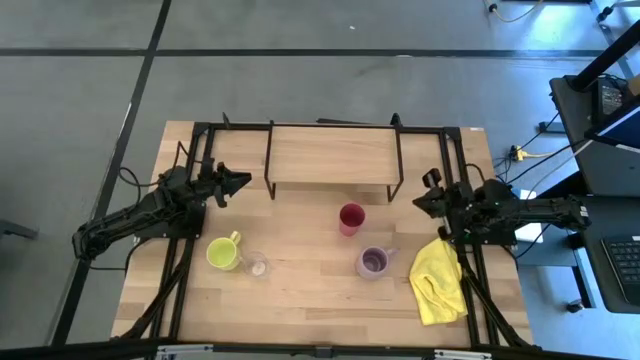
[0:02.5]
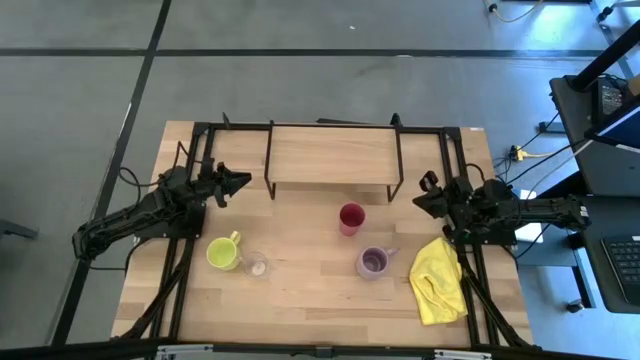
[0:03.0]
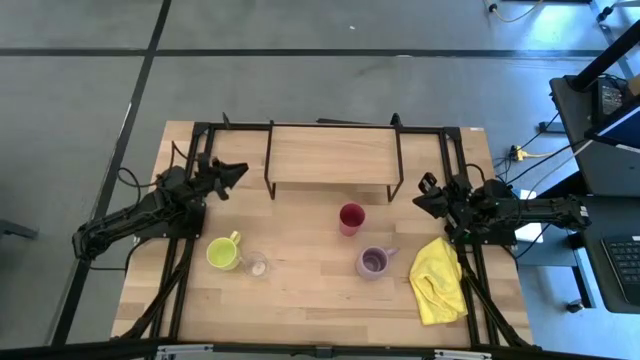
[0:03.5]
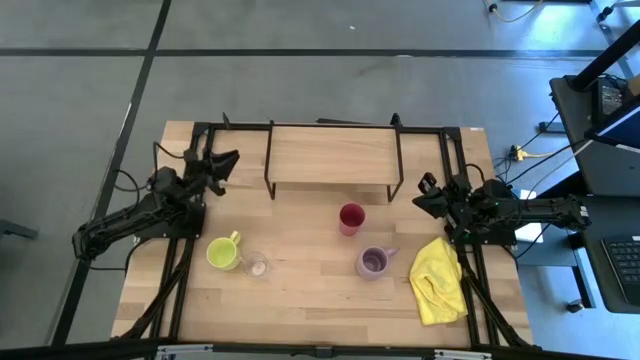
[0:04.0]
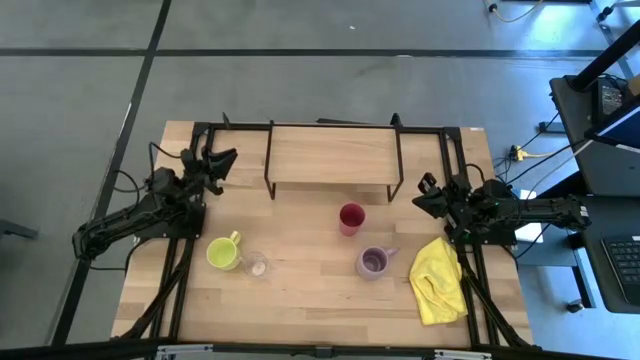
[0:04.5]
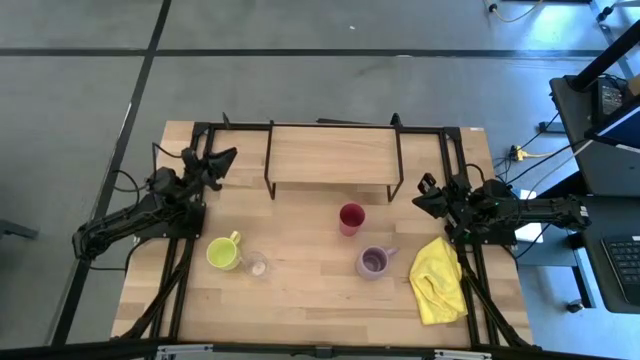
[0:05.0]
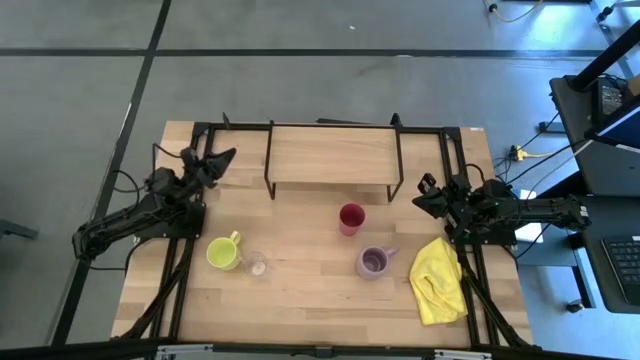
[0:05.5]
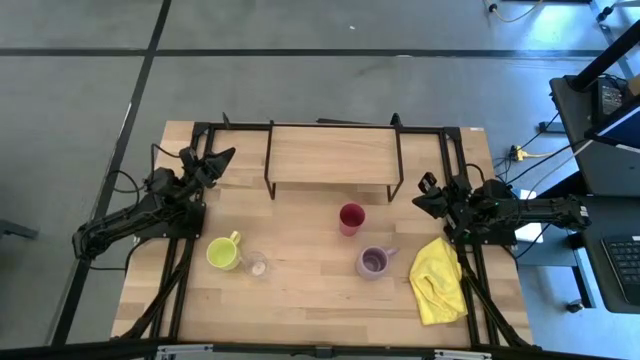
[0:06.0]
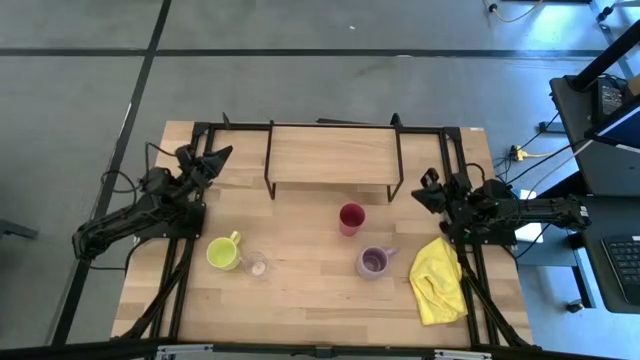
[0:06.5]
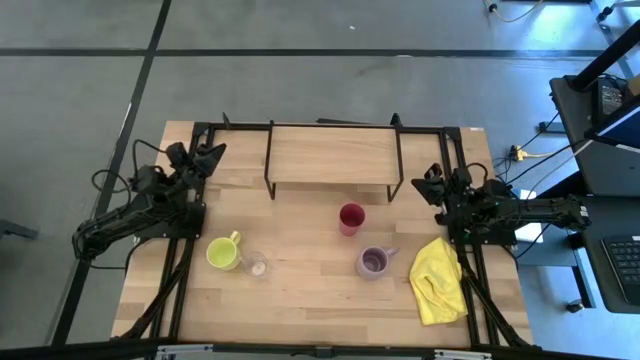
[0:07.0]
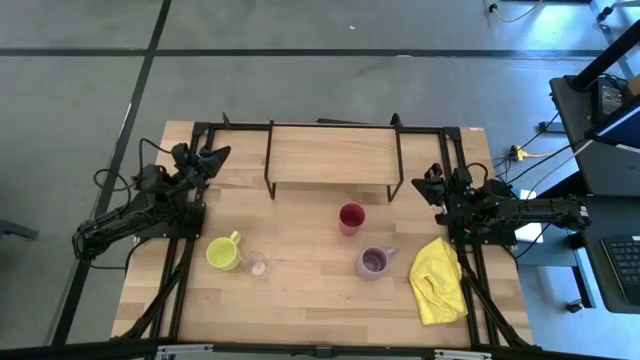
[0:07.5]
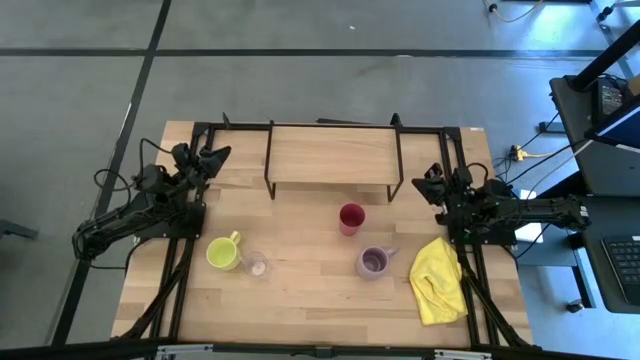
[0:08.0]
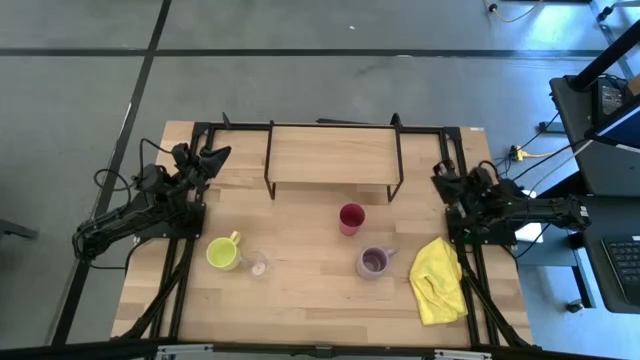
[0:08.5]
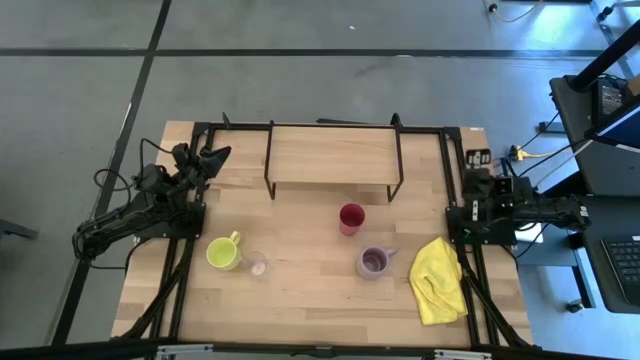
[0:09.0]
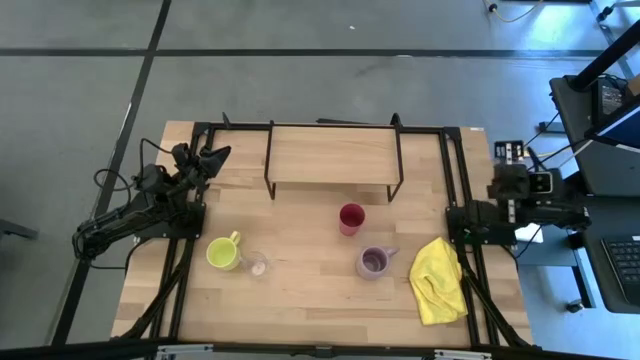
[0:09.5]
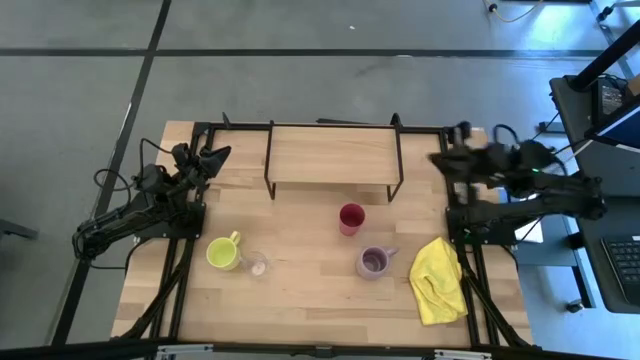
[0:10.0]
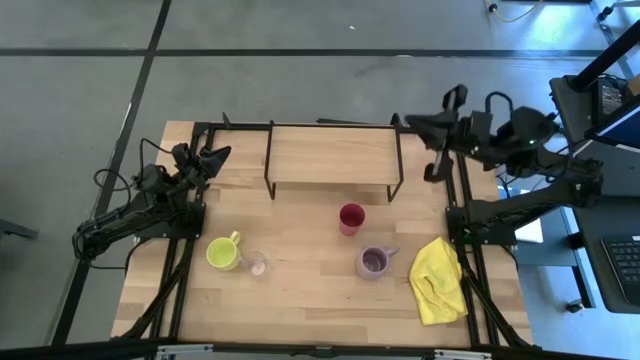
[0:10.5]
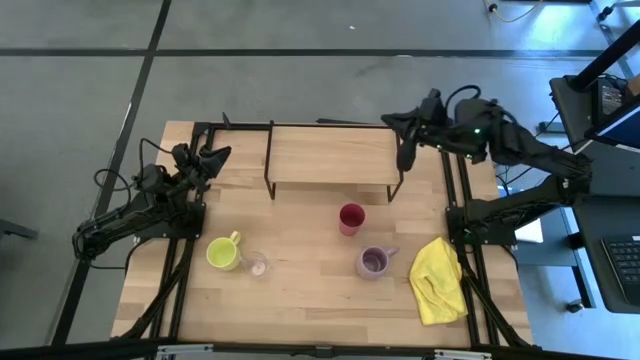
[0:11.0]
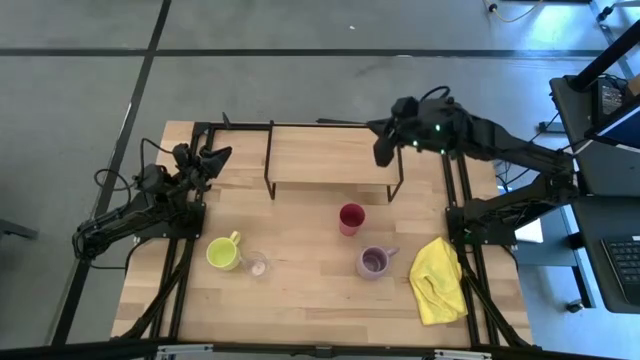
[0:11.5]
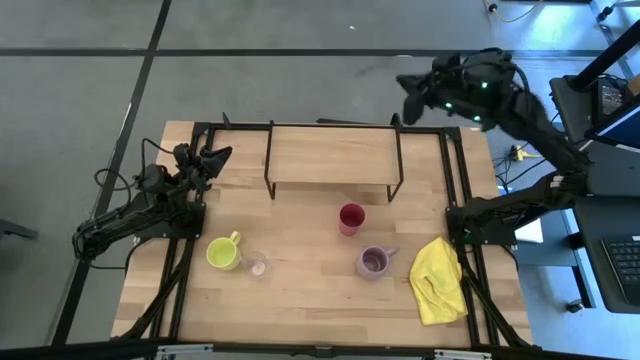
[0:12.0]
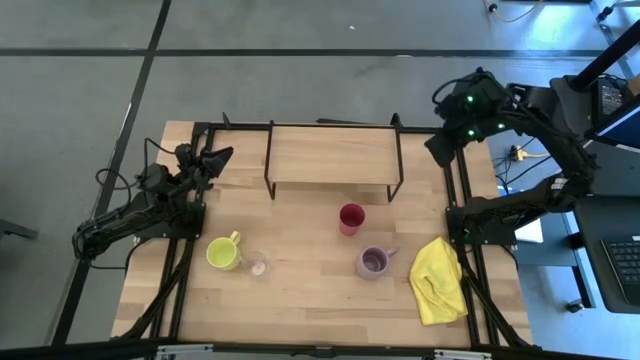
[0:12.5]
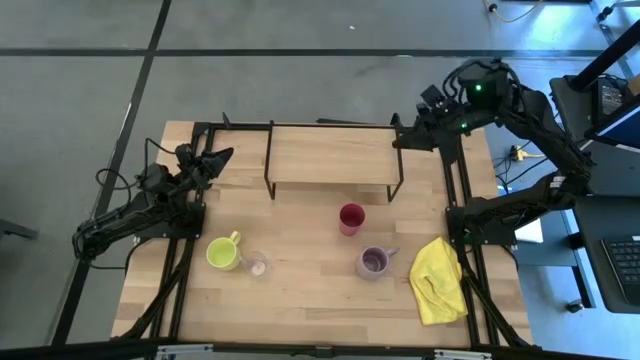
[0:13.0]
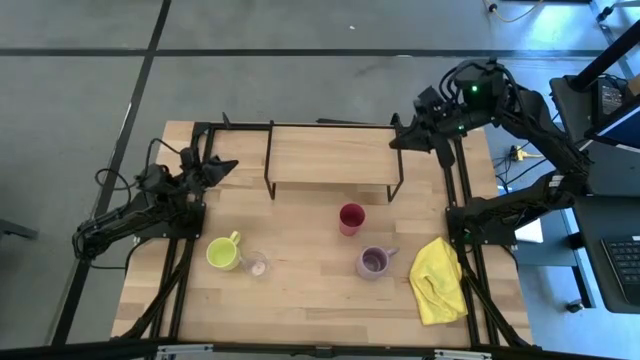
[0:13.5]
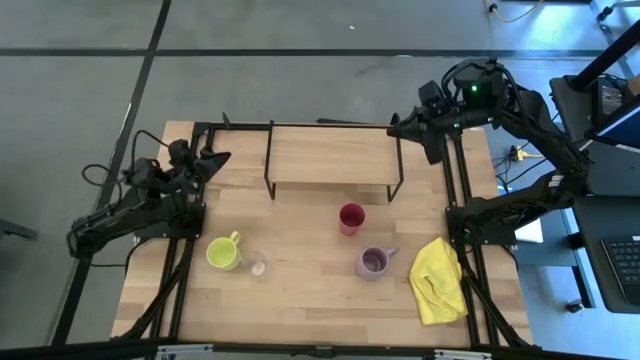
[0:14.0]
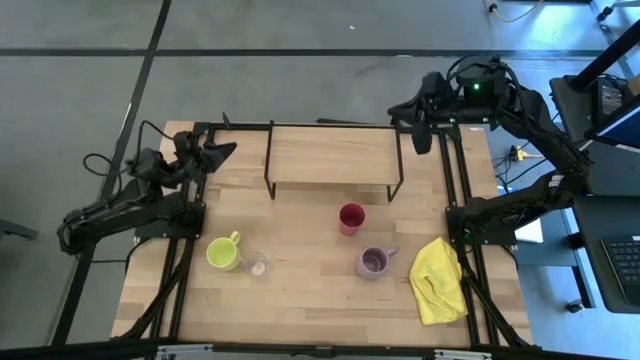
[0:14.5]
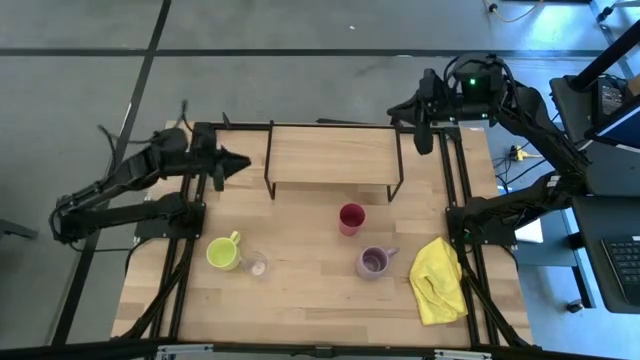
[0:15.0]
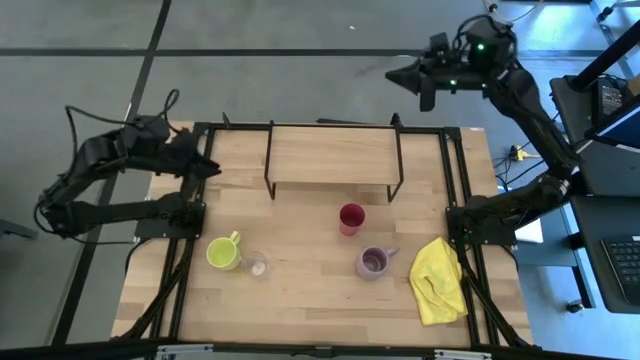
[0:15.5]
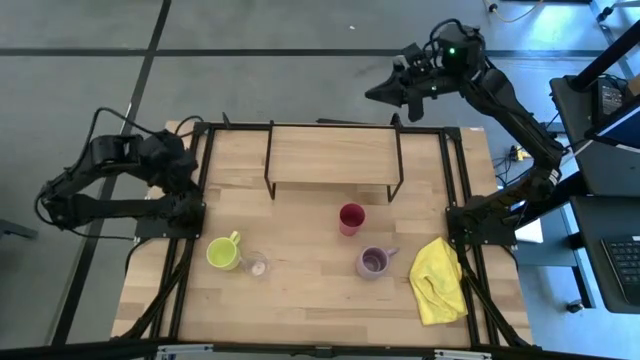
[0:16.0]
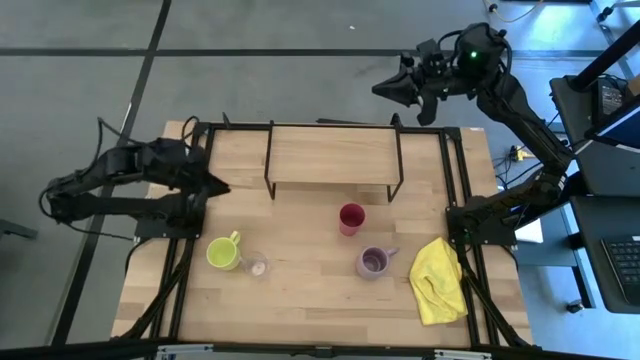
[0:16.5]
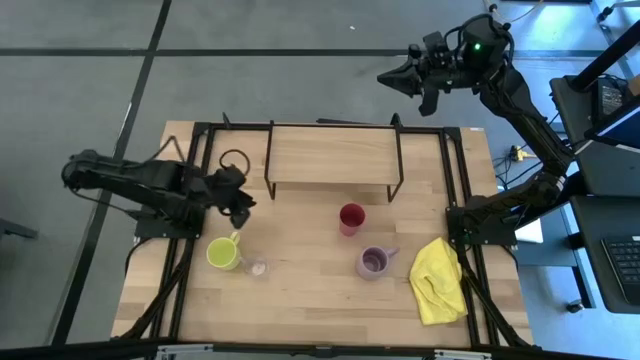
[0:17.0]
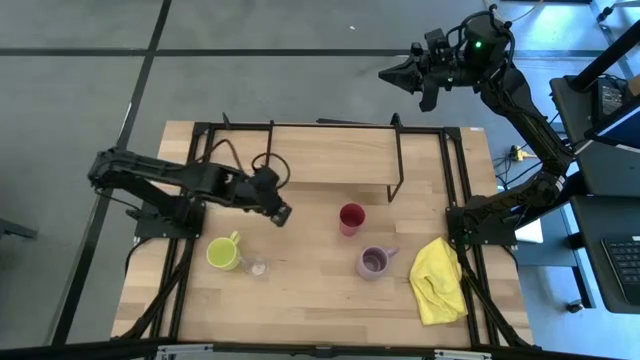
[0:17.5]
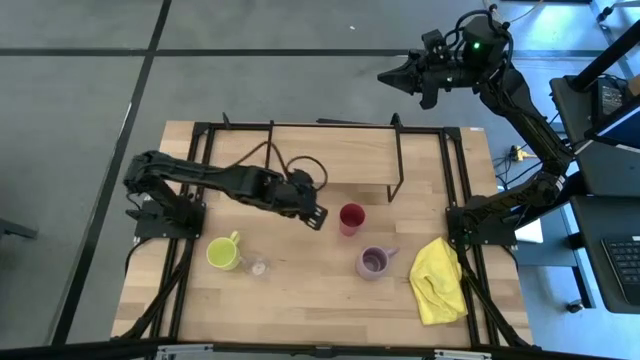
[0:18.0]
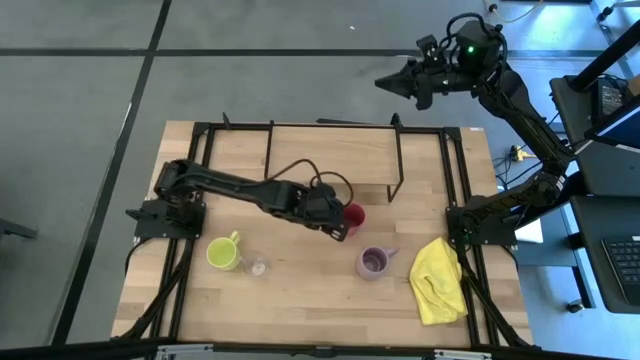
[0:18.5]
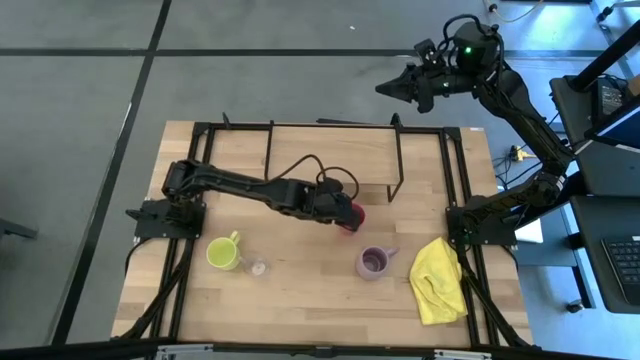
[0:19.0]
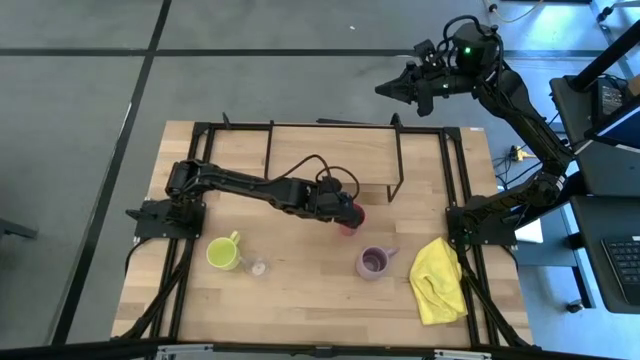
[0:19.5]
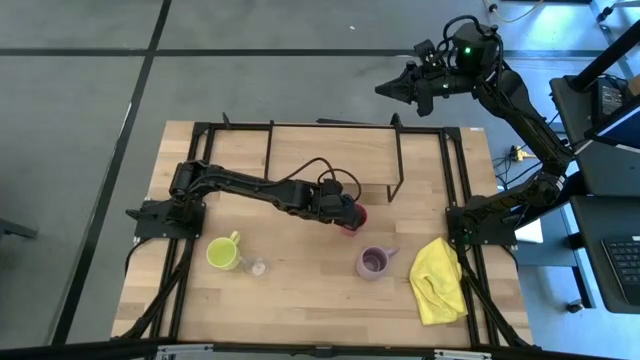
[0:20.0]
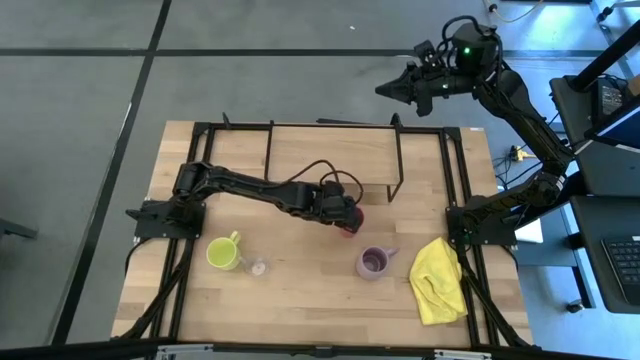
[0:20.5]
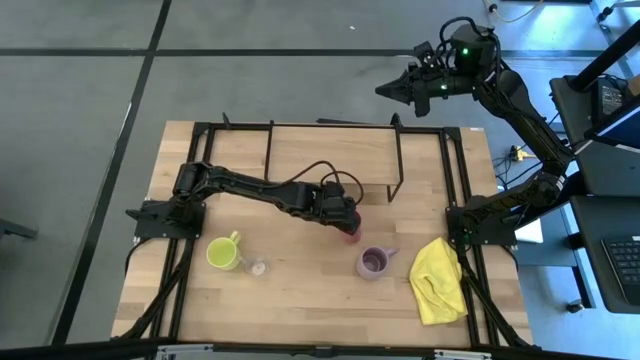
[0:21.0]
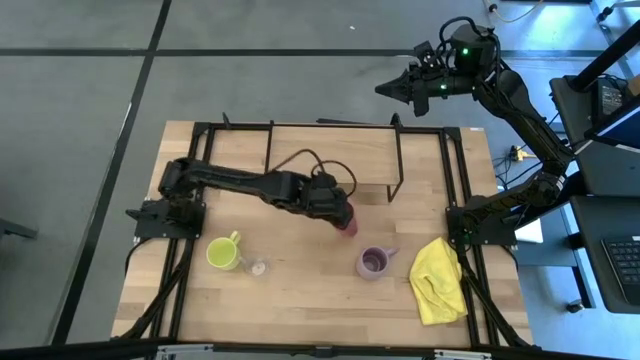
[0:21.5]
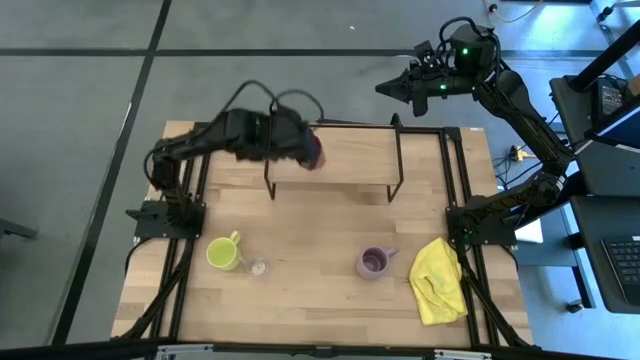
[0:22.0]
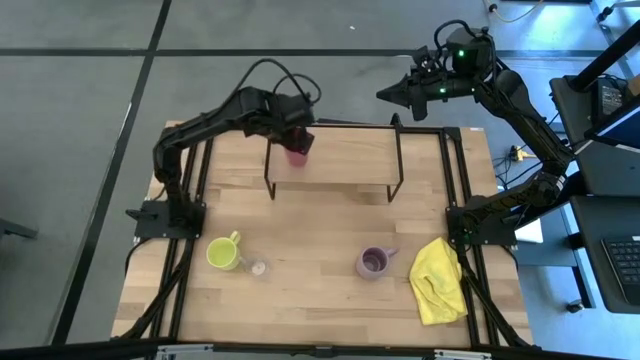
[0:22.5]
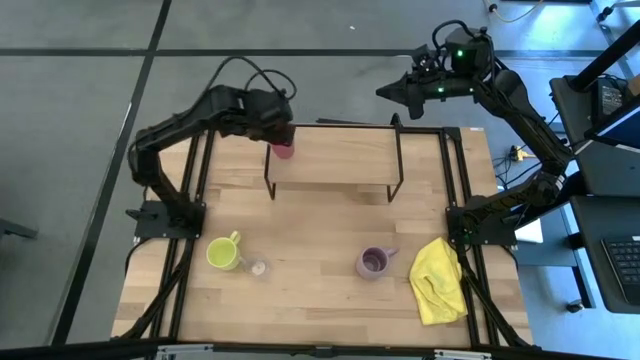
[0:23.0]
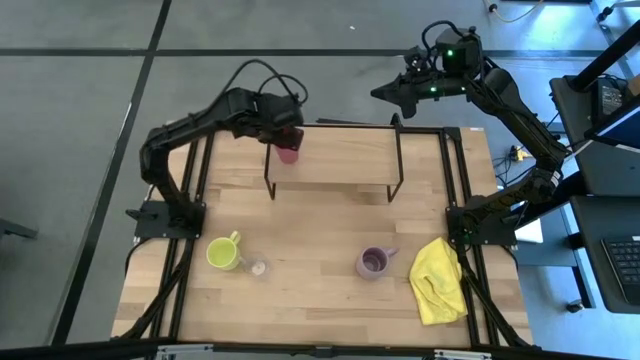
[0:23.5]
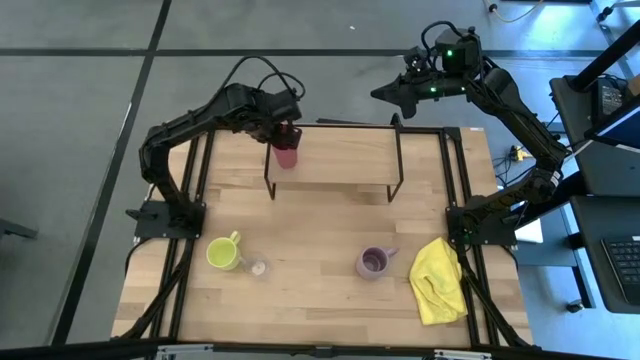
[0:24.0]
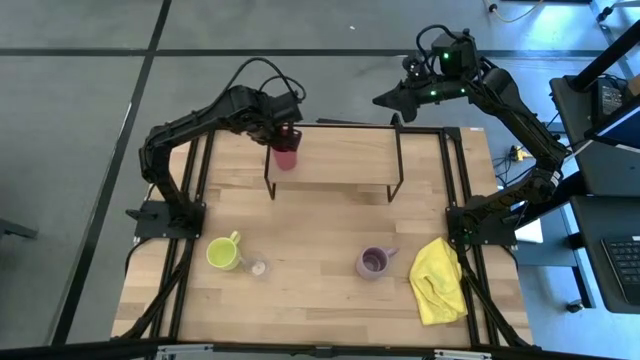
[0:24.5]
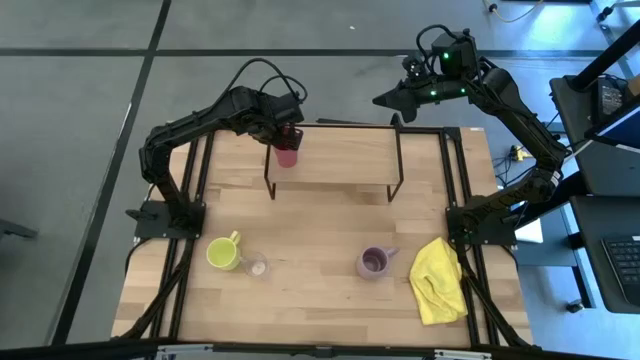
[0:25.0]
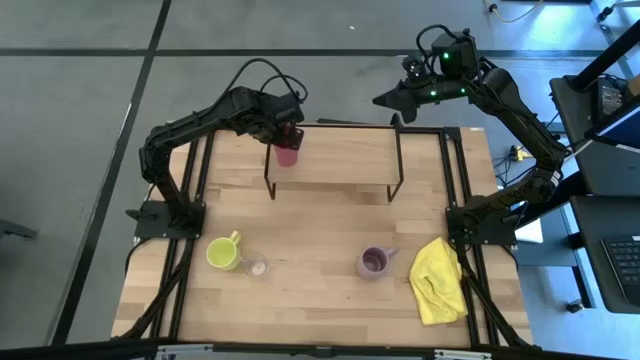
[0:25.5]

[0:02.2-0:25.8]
Task: Stack small to large cups/mugs on shelf
Put the pink cup on the shelf
